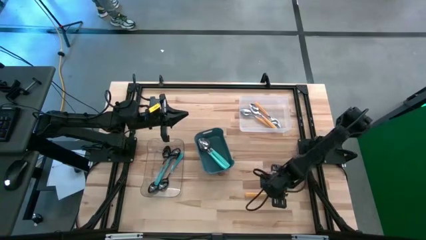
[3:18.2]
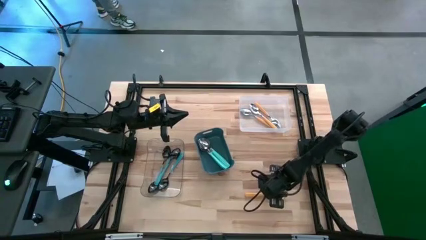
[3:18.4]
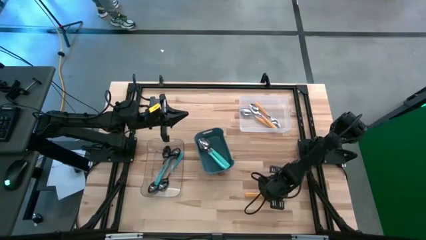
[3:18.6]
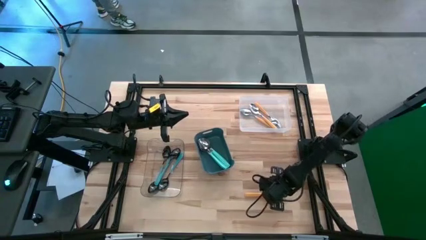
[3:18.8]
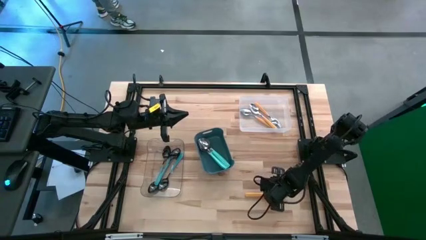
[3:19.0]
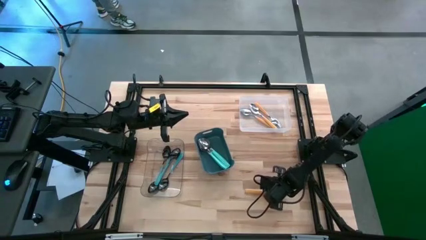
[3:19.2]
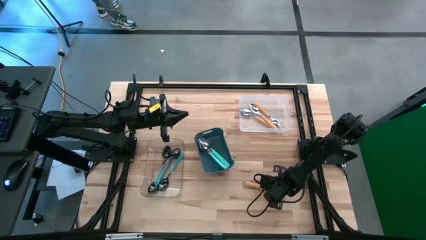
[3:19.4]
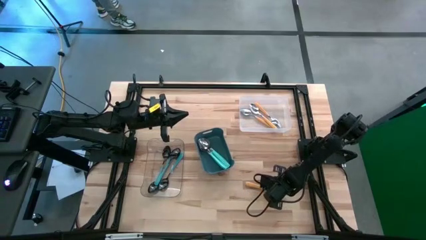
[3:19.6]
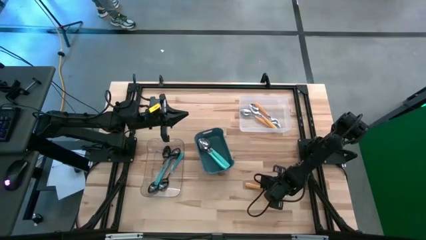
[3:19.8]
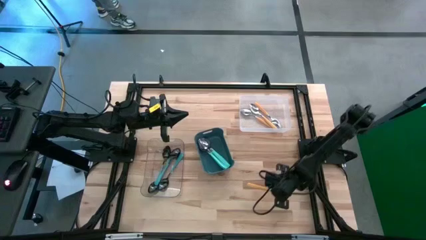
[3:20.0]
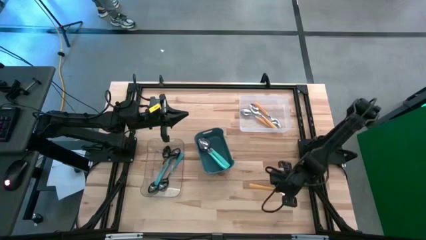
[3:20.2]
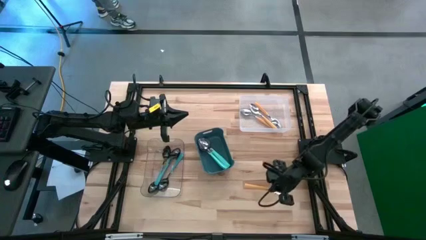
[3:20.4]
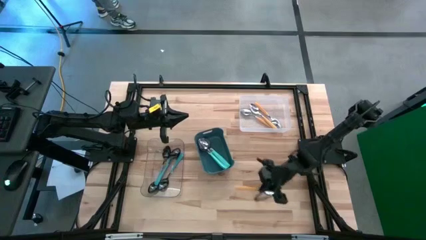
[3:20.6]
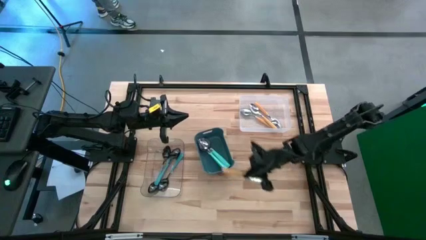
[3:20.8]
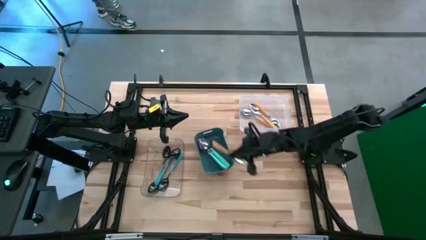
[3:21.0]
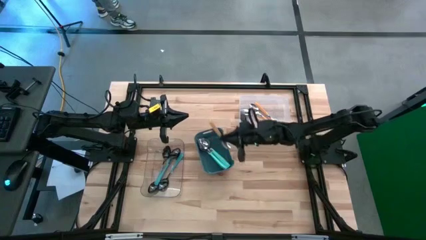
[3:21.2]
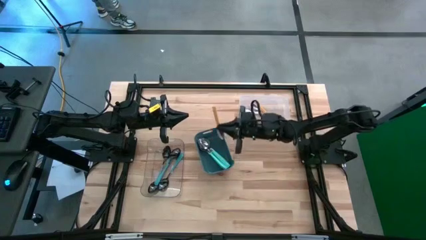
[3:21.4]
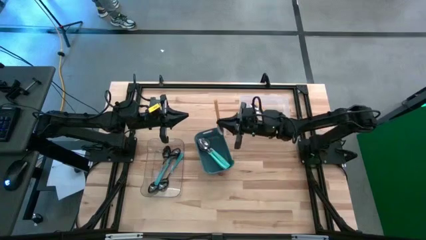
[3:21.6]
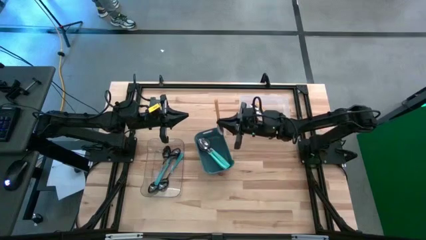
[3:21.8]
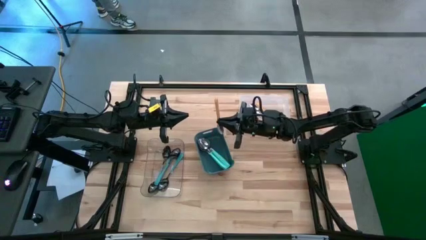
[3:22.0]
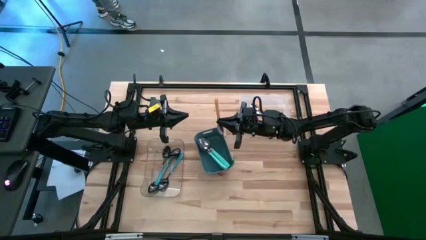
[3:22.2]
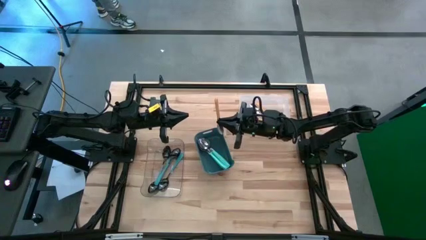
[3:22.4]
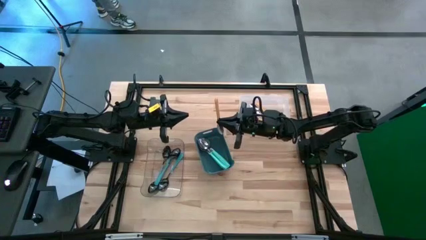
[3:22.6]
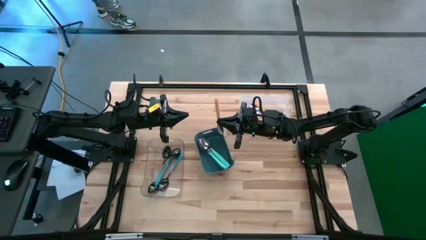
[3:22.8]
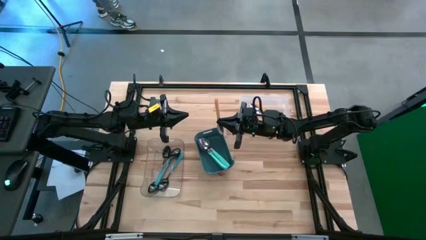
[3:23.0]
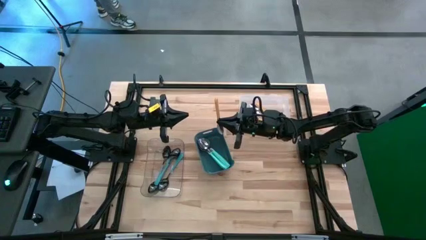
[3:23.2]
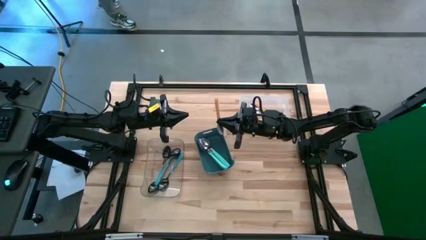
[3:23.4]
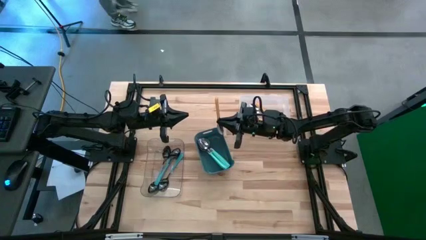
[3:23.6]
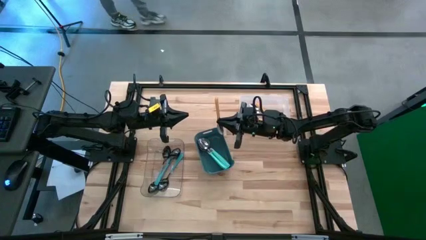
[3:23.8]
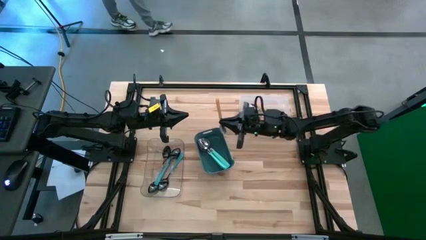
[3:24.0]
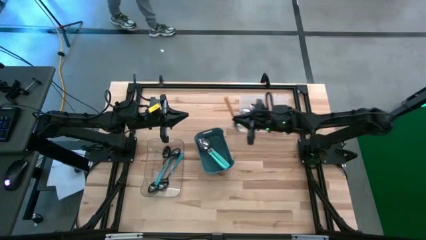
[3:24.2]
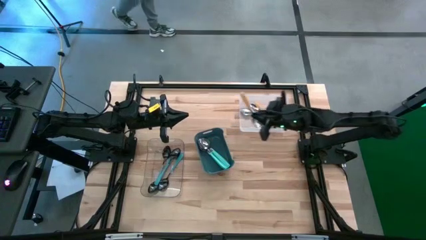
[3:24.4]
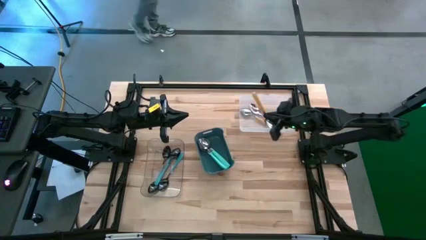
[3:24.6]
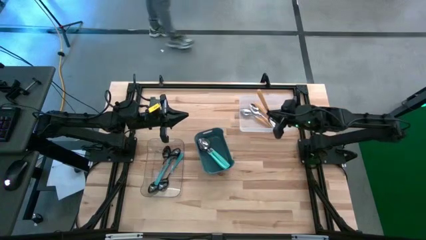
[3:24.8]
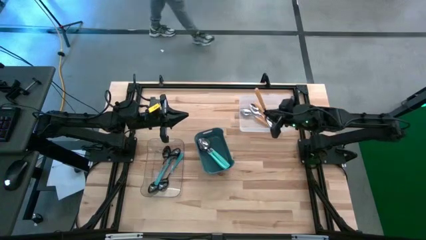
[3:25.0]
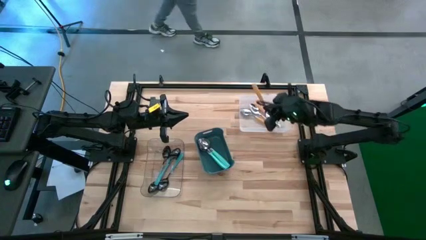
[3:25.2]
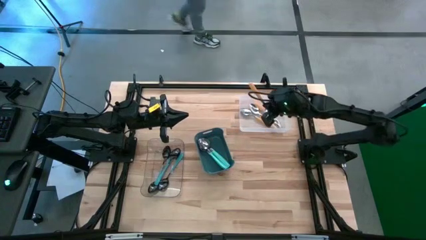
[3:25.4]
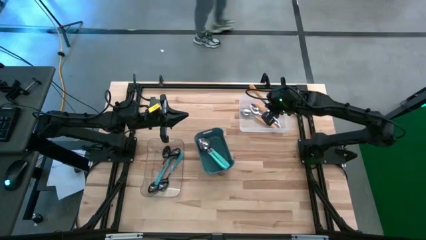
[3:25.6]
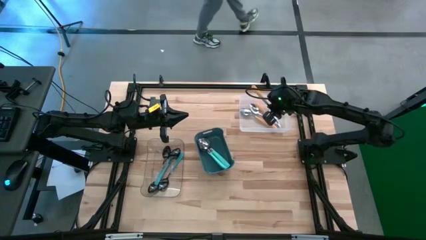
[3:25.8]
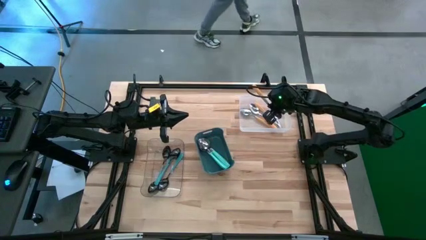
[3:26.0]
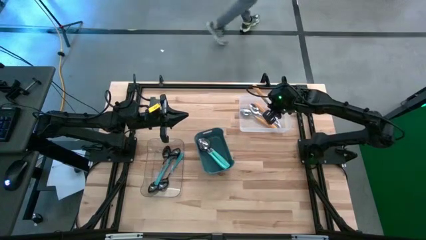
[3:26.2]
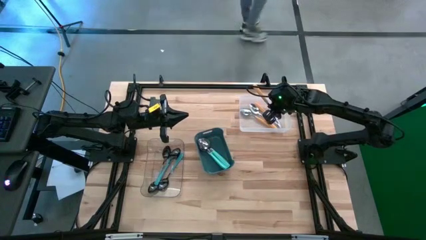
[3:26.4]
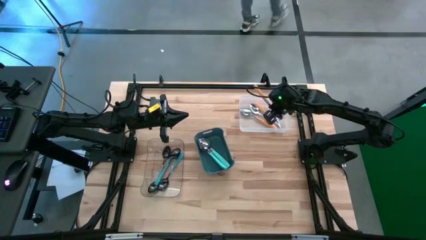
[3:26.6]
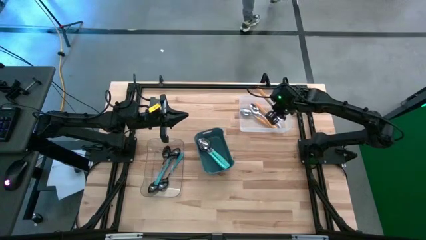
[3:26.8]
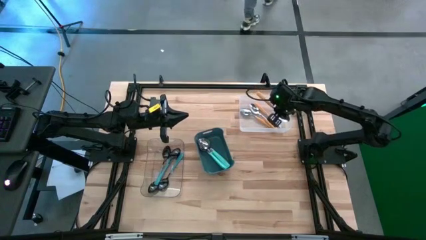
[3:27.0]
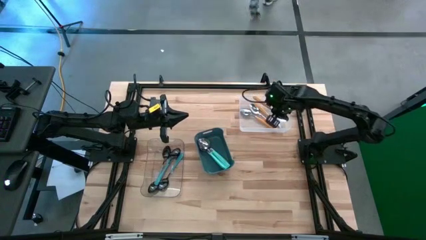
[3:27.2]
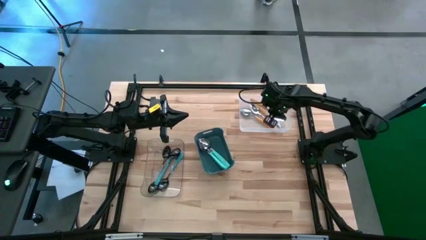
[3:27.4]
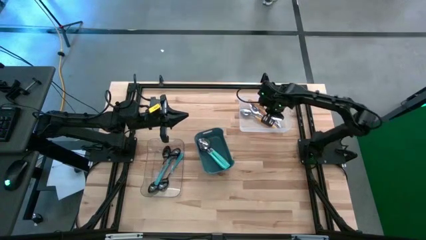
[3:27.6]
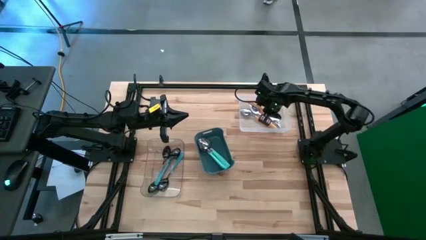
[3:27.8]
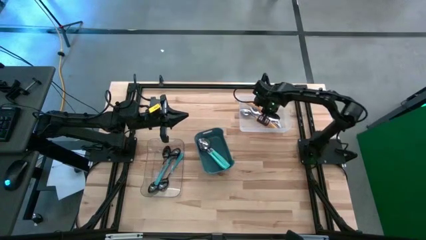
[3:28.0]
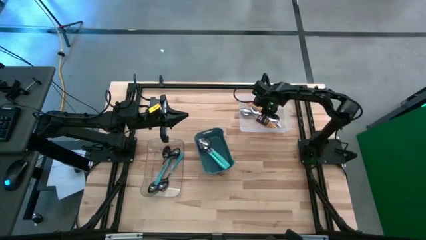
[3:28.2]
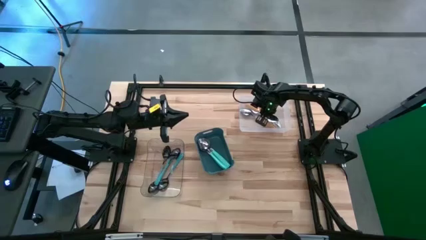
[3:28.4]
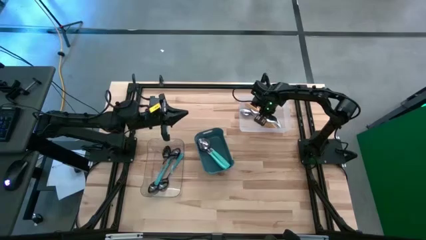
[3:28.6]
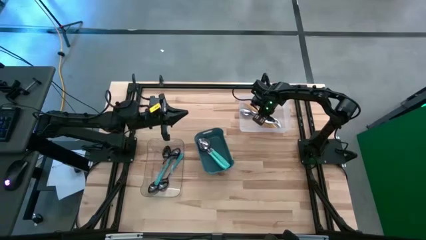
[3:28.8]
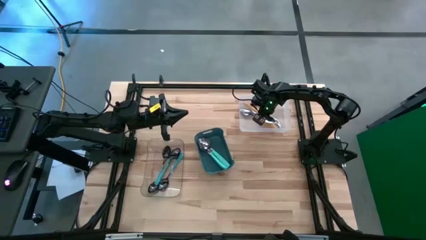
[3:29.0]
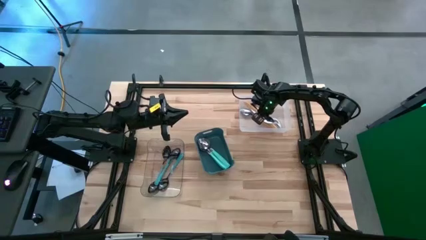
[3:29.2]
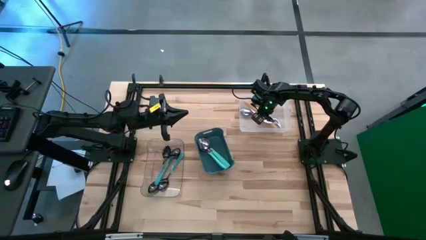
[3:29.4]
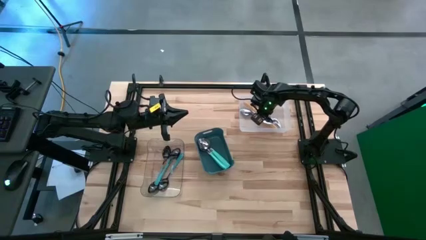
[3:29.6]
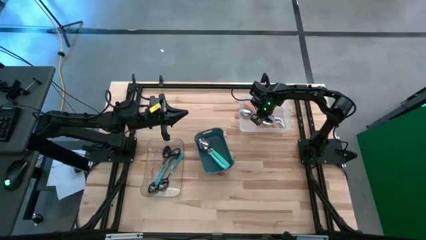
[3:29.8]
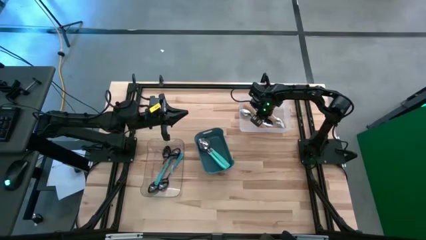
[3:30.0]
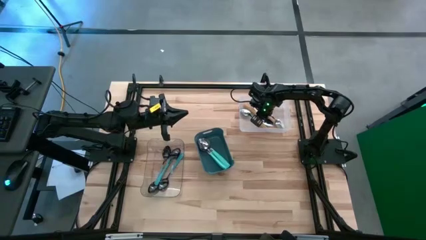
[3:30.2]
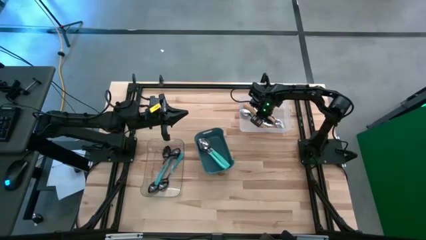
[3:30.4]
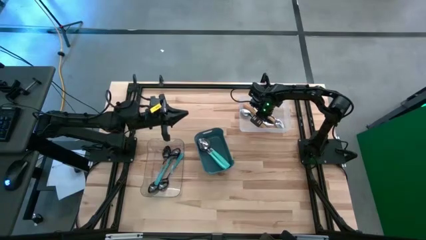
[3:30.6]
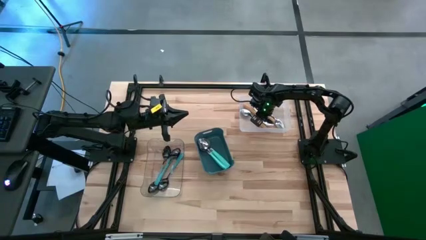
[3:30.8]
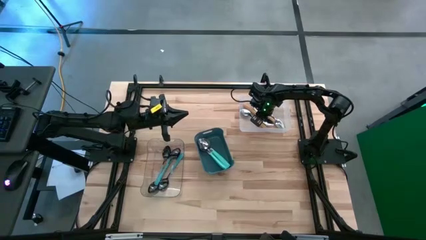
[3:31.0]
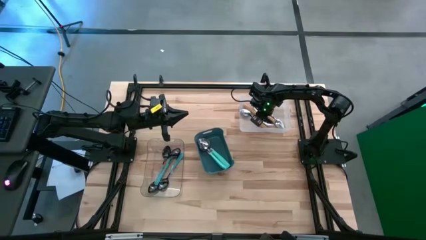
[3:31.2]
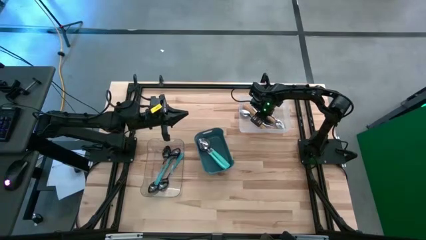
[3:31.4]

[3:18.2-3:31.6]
Task: Sort silverware by color (type)
Put the orange table spoon into the white bin

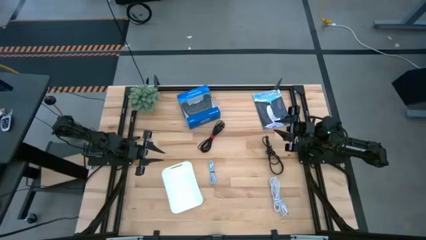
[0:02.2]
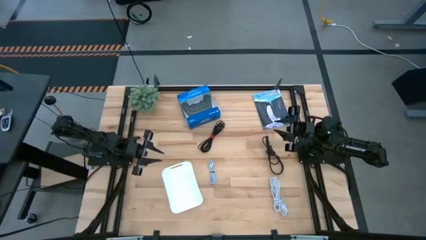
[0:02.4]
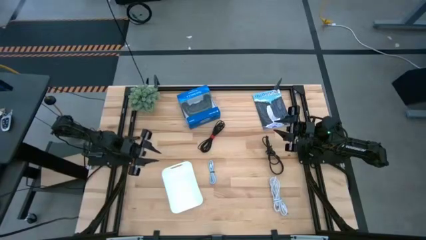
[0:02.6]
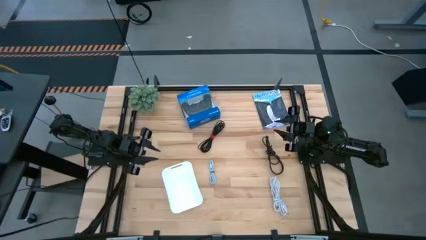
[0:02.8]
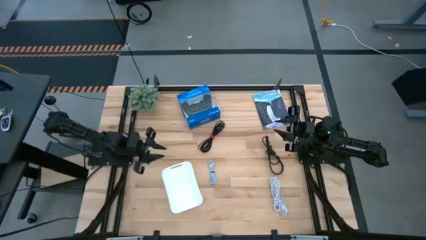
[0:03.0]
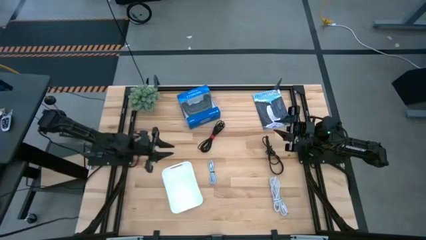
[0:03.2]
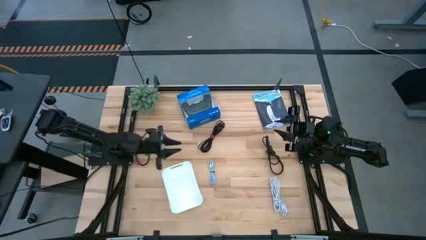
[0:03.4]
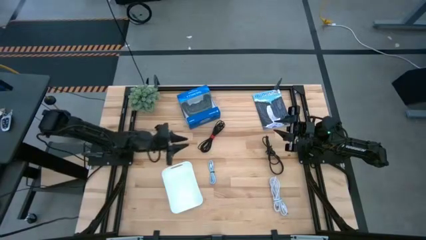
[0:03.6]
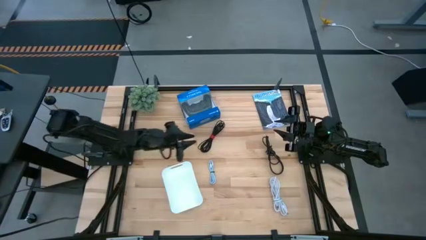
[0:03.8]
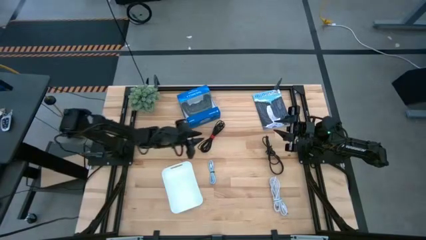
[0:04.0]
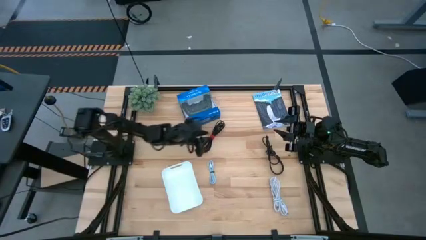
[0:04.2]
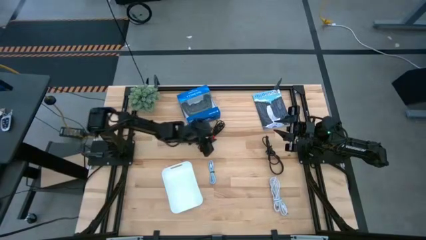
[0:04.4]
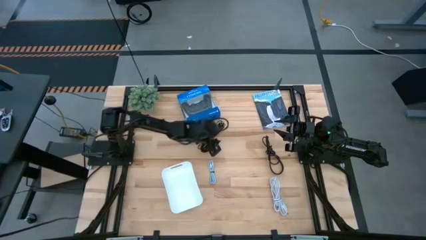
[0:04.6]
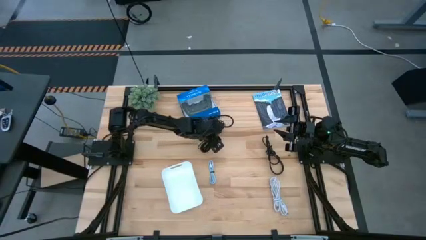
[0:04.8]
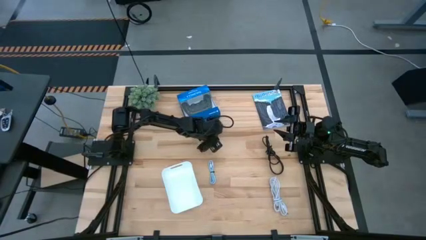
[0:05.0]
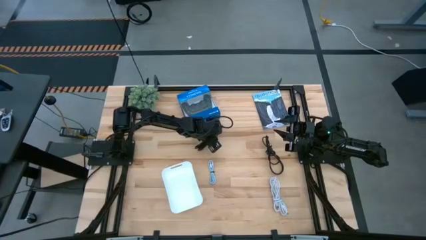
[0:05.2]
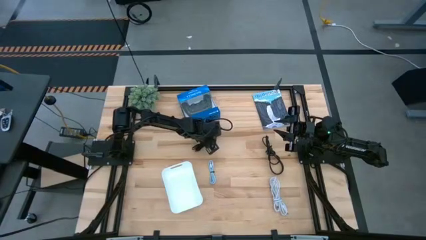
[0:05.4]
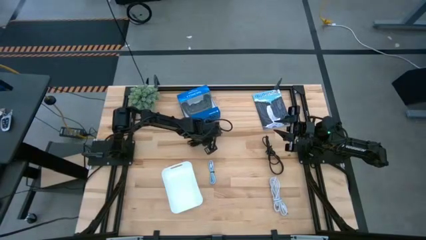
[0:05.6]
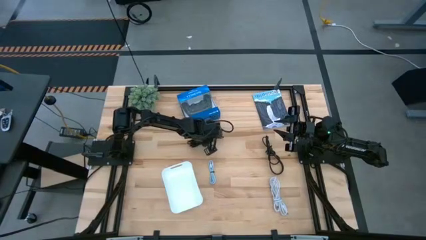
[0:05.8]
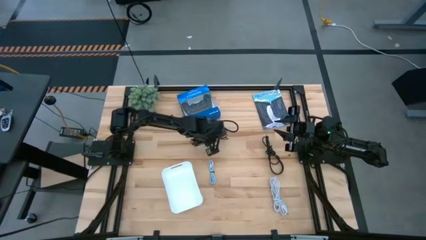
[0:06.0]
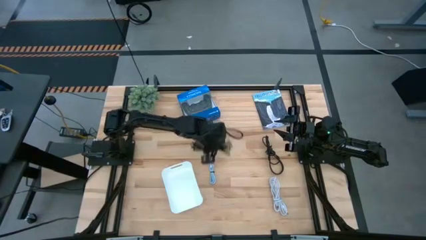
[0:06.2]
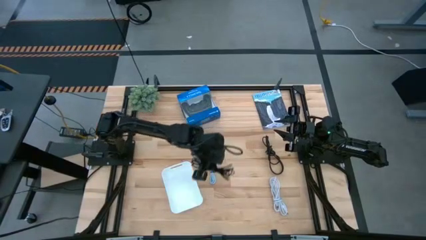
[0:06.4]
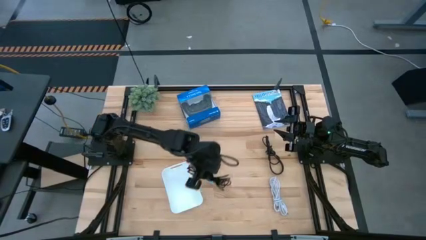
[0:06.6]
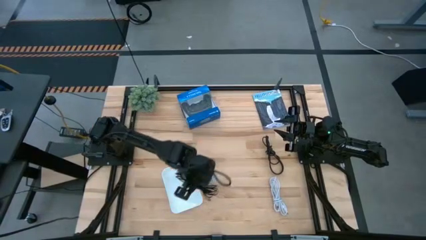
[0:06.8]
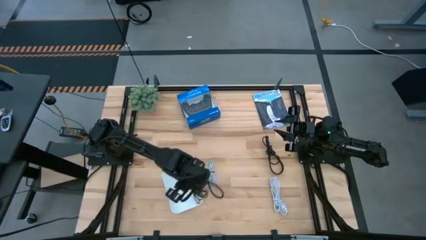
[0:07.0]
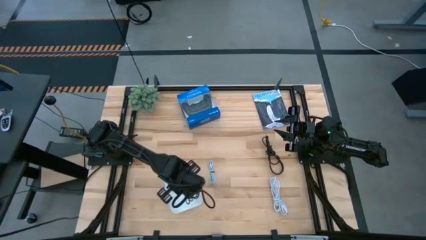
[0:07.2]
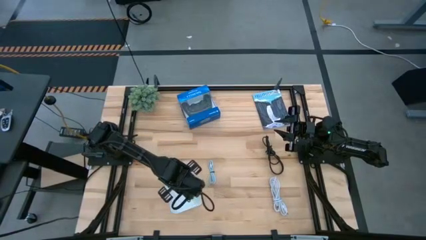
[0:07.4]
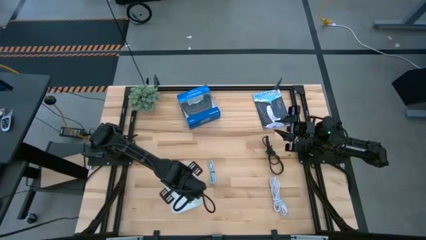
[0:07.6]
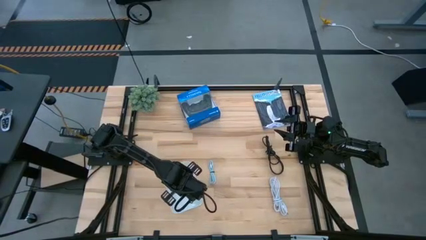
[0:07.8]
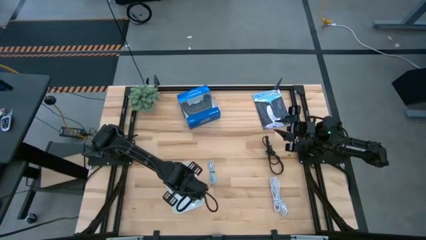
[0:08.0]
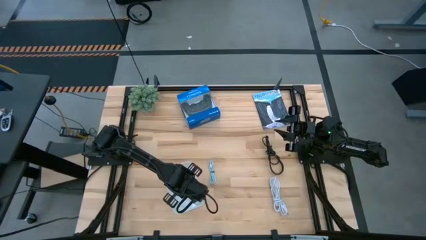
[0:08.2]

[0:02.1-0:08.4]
Task: Pick and place USB-C Cables
Put the left black charger cable into the bin
